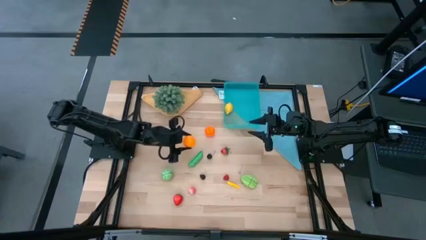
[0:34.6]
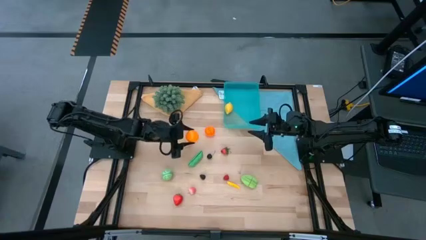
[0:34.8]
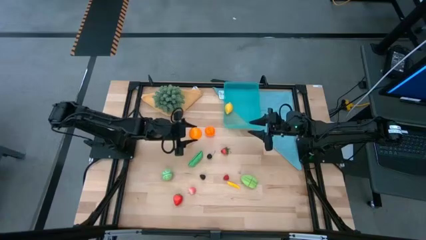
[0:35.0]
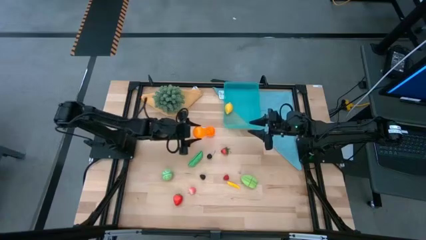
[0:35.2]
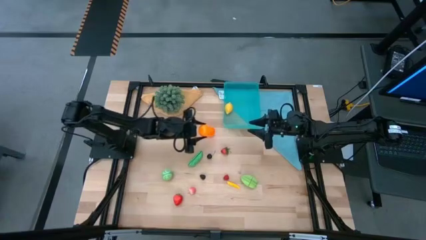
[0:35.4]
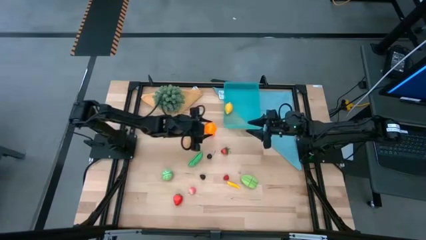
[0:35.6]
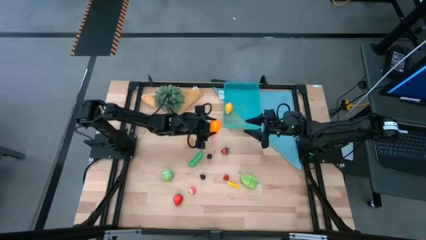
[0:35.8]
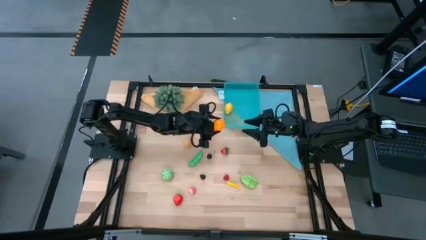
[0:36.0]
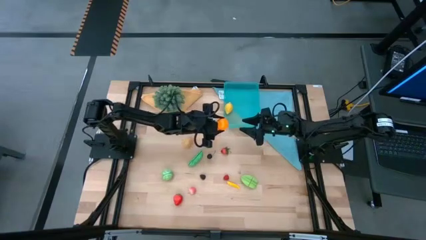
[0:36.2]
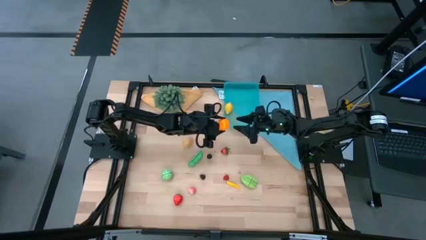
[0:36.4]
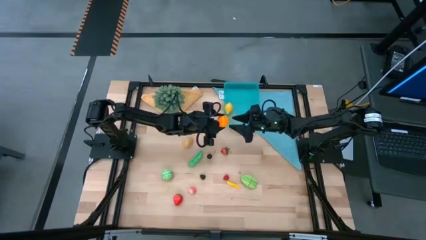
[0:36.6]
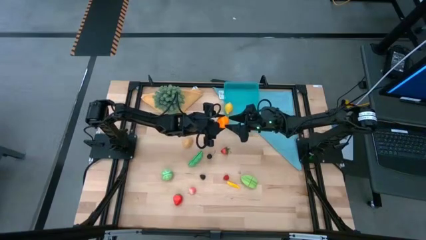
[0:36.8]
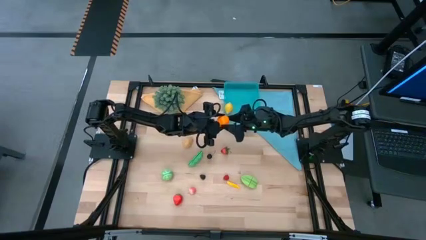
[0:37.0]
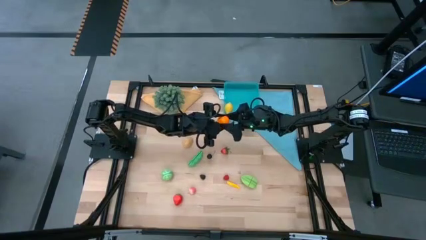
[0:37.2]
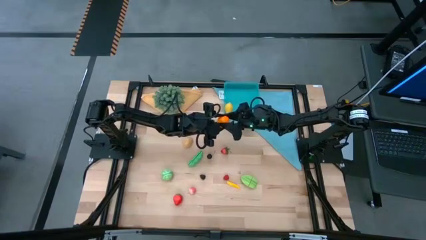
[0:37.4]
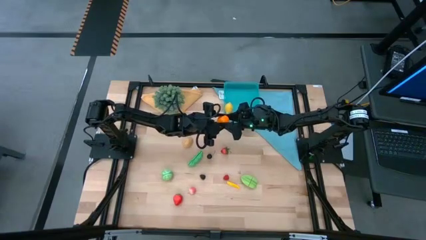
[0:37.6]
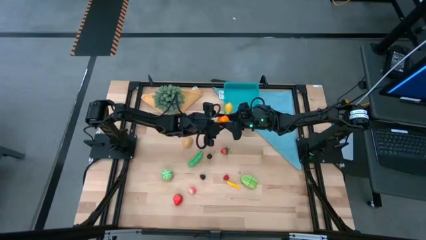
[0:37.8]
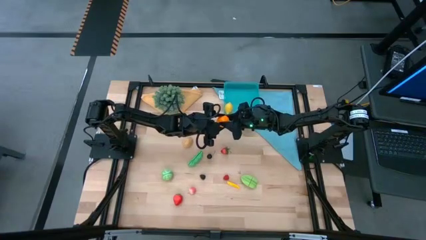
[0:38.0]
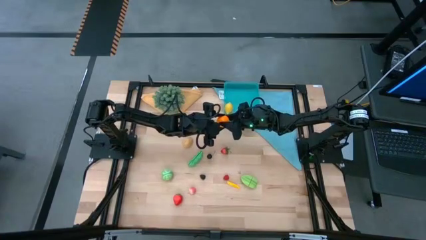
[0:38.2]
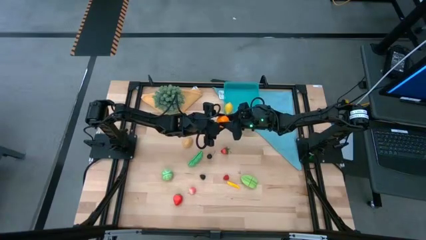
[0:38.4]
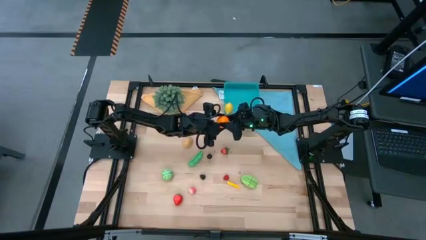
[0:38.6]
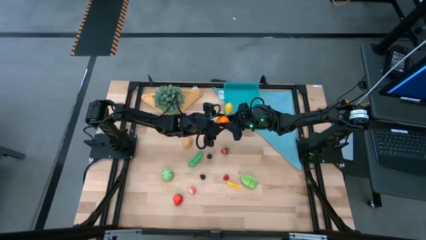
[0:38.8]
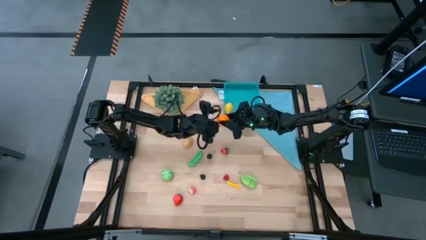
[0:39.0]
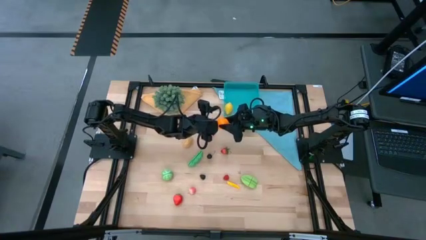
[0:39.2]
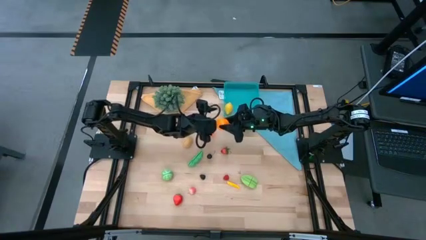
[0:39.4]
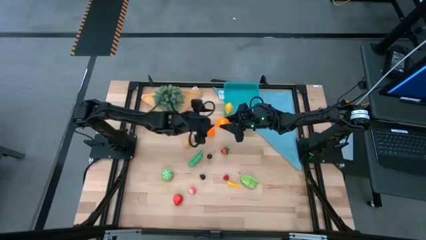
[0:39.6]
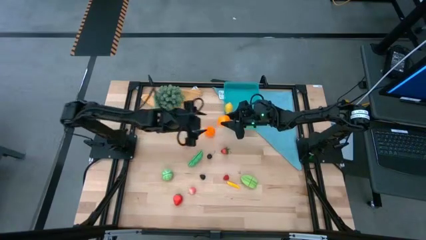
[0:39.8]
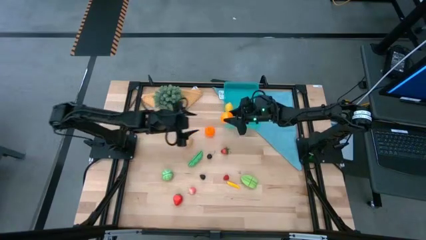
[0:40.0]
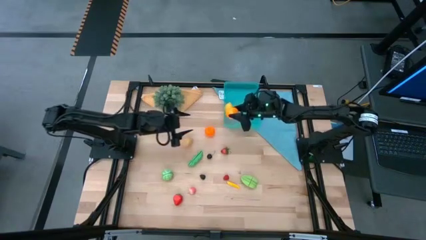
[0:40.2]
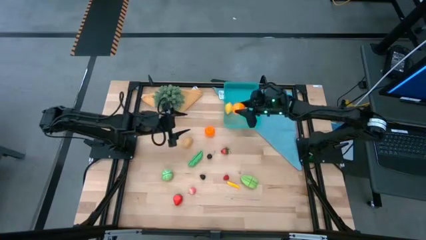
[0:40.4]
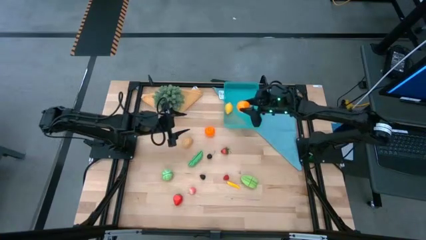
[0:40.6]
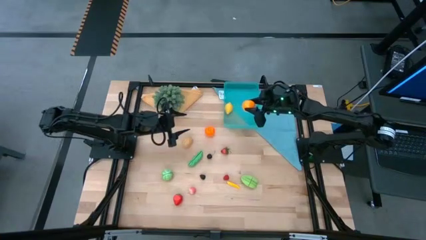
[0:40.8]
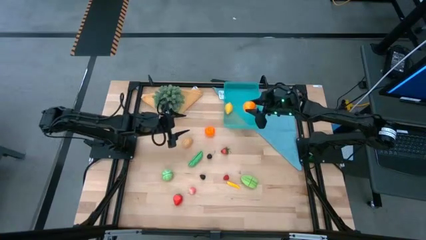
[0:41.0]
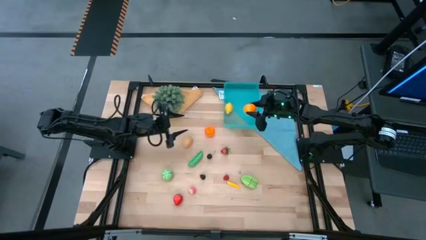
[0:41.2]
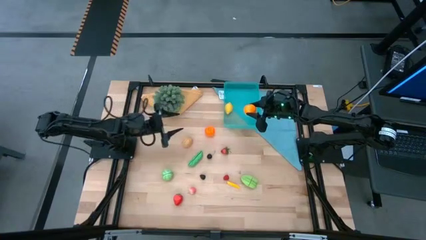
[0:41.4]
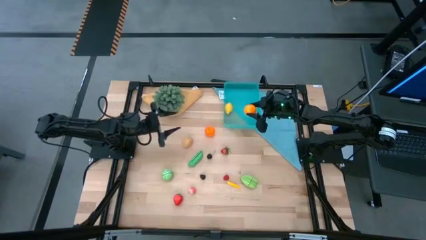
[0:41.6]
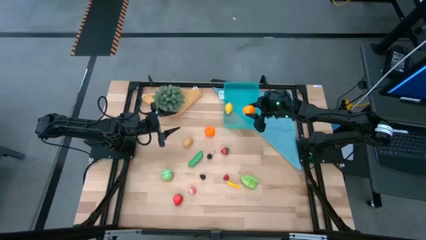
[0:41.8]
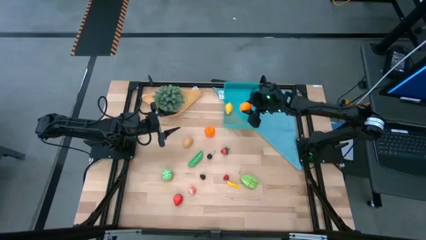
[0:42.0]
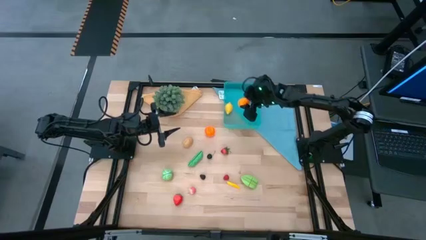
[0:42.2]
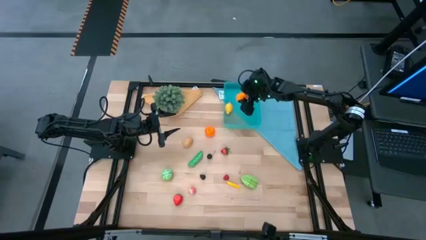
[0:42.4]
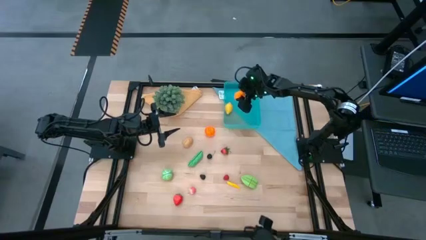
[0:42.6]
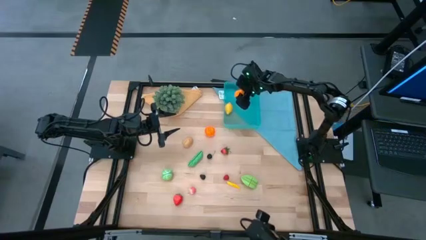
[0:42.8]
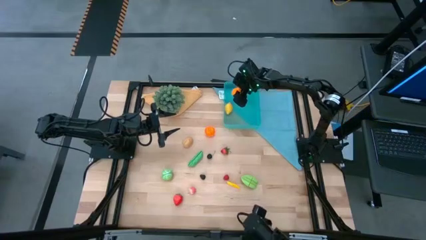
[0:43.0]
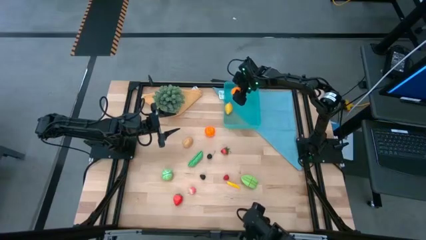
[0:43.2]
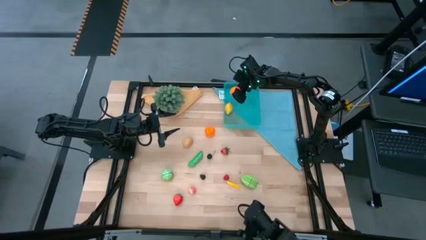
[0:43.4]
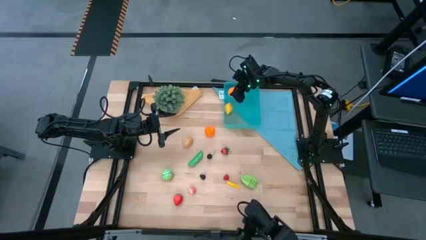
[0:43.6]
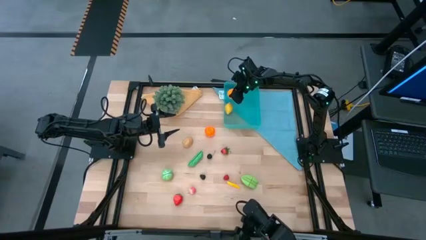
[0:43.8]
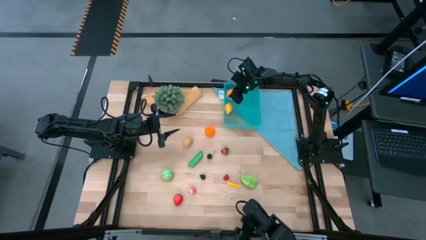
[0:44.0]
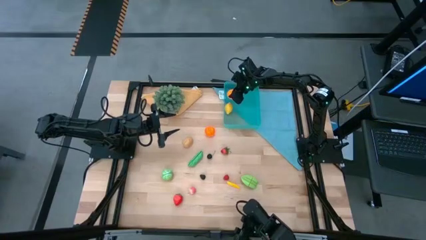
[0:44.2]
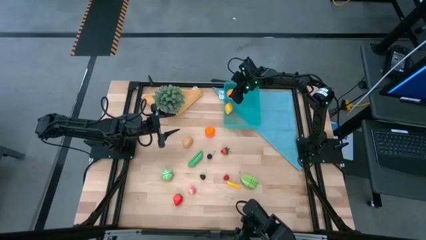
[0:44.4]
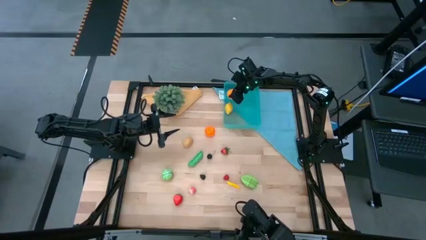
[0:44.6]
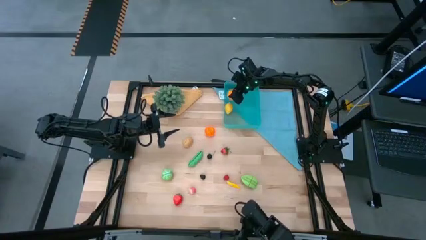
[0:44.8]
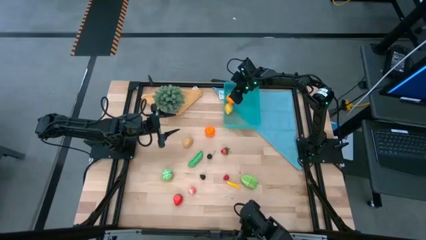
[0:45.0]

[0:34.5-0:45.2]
Task: Pick and placing Produce into tupperware
Put the orange into the blue bin

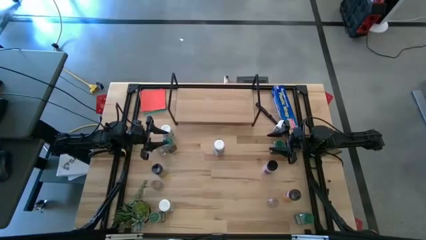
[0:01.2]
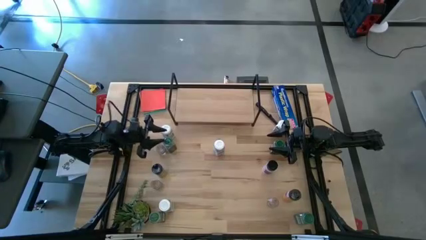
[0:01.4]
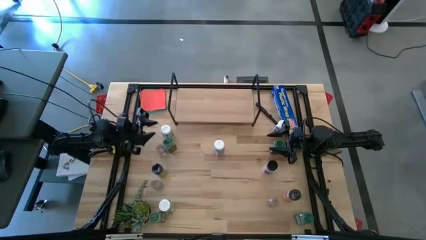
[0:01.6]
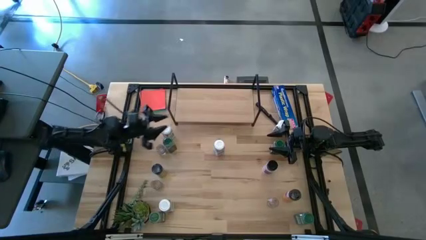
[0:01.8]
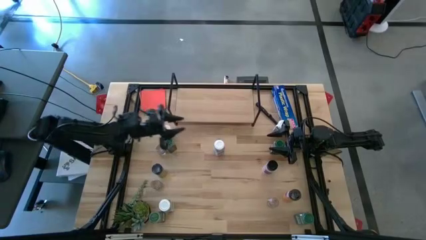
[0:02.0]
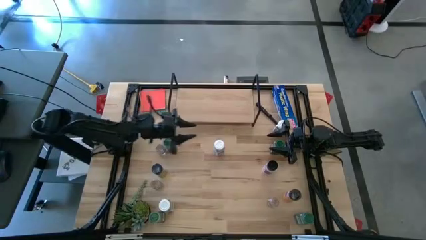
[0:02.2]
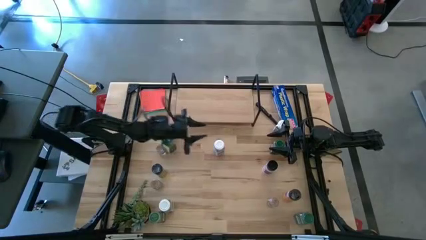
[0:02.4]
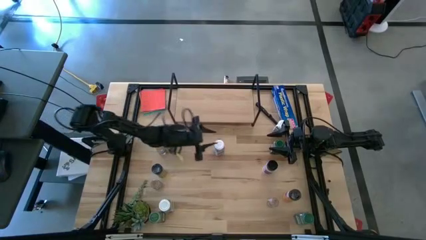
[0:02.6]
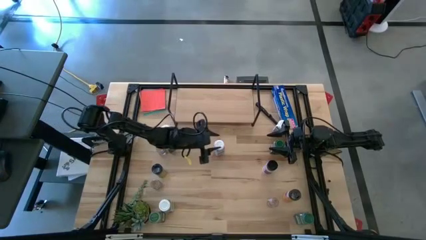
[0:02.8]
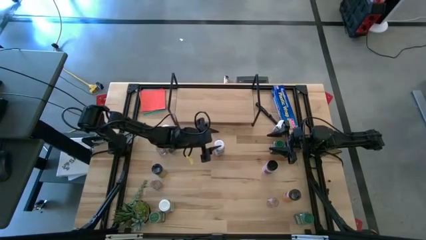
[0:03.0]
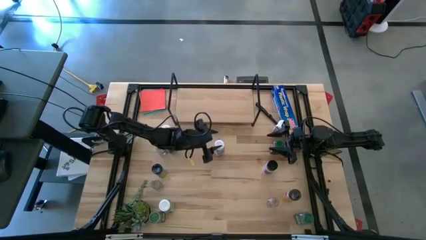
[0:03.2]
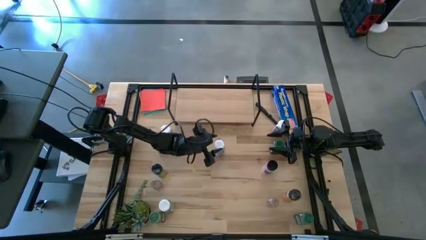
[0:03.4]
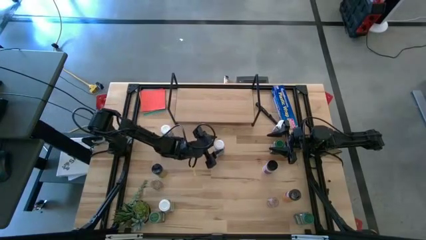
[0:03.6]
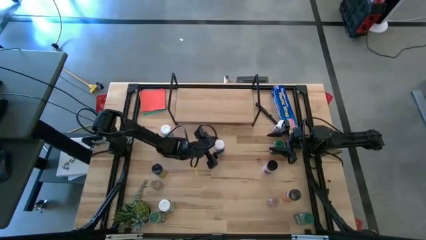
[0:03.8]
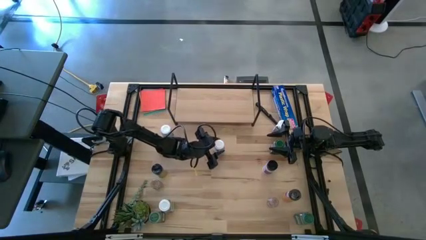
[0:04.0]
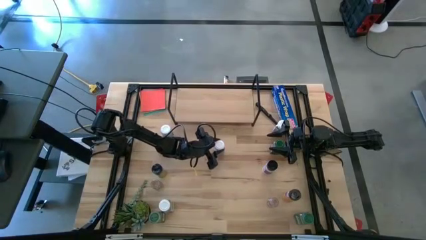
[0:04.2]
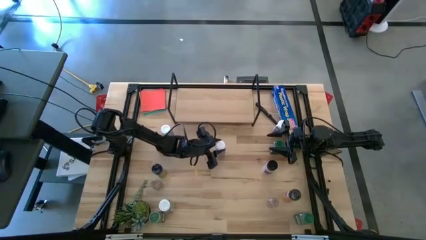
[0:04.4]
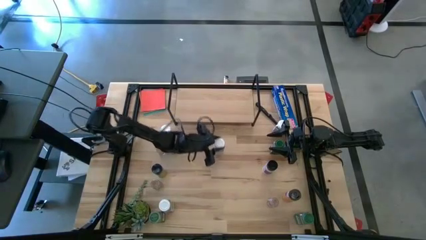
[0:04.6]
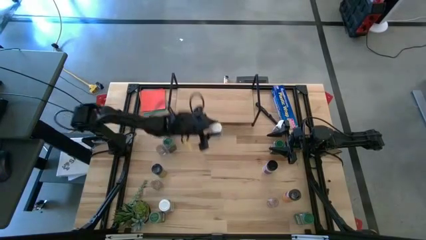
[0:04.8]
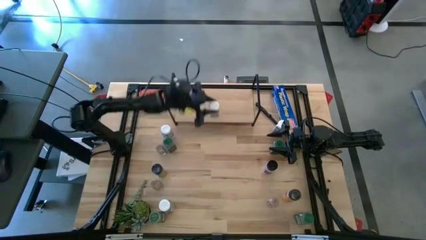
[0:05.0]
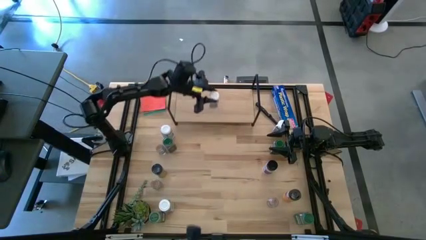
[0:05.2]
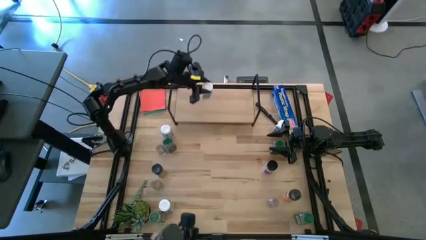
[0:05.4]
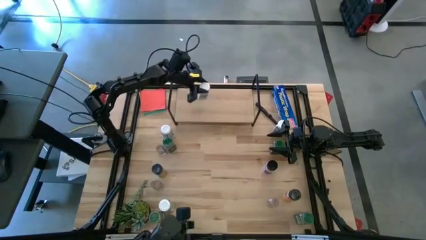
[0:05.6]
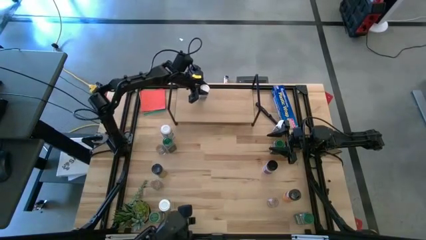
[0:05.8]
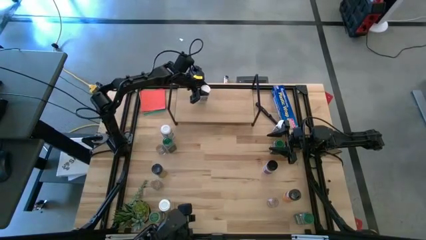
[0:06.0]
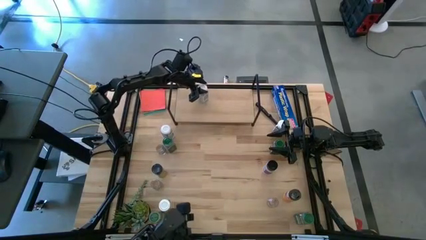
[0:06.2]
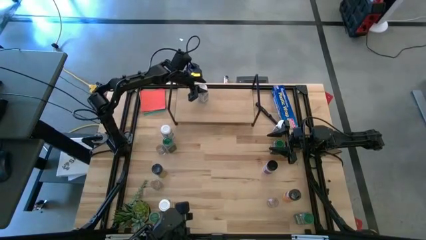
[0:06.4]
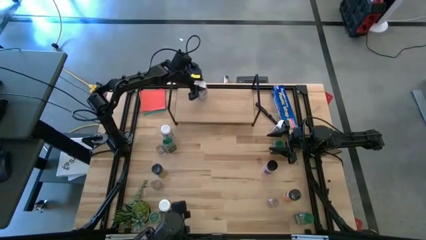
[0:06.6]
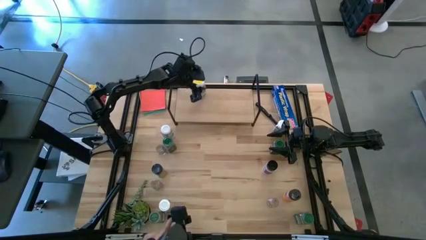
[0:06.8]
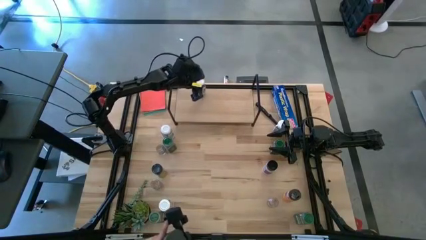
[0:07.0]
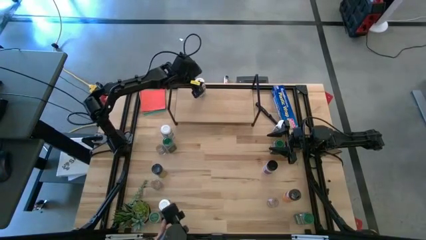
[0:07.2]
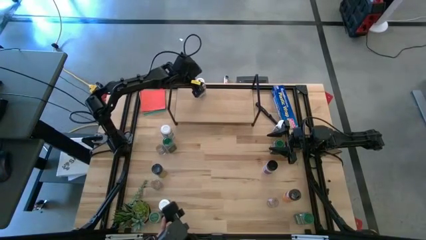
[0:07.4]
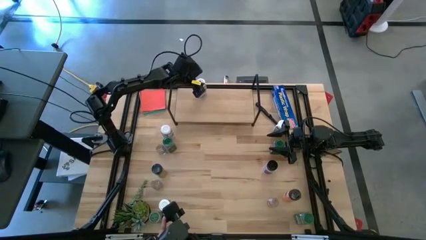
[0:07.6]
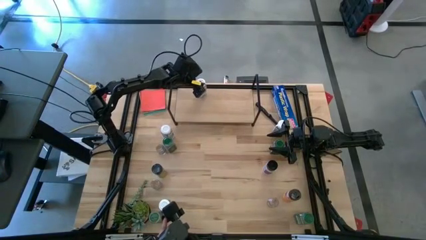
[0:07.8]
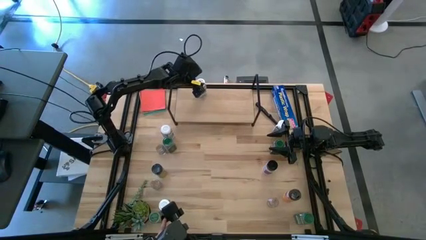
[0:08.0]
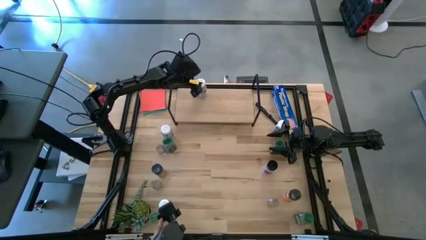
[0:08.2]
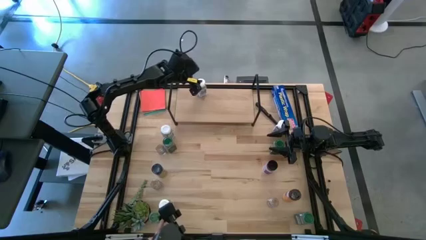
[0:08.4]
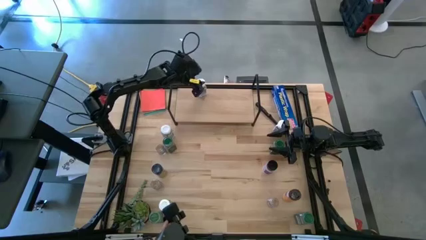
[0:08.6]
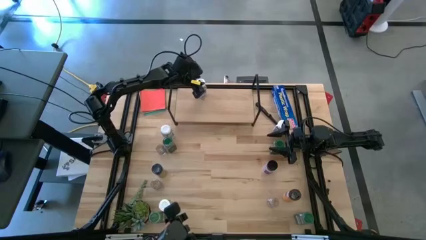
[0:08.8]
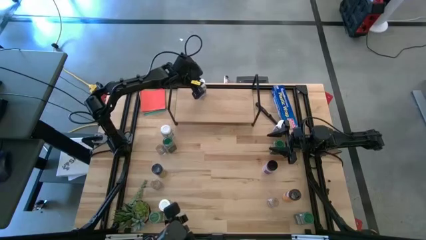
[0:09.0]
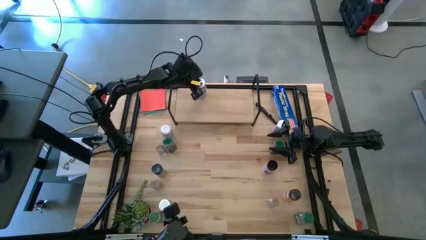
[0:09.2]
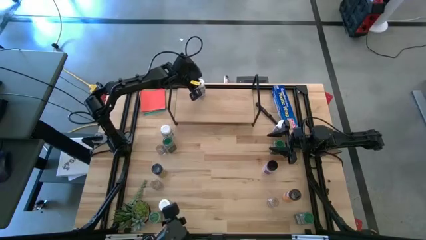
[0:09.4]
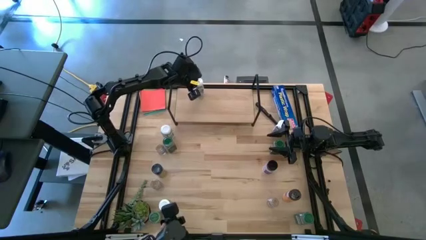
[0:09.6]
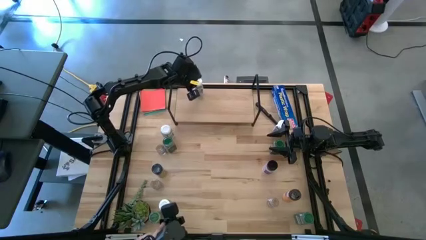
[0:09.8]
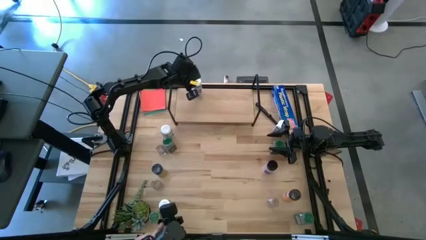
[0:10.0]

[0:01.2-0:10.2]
Task: Shelf spices
Put the center white seasoning bottle on the shelf
